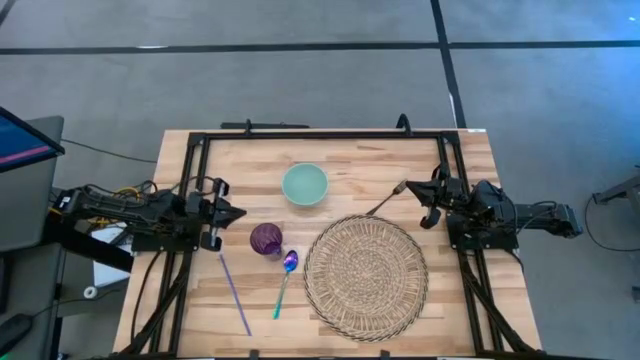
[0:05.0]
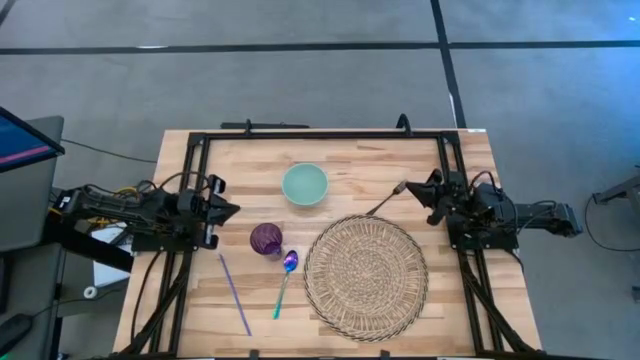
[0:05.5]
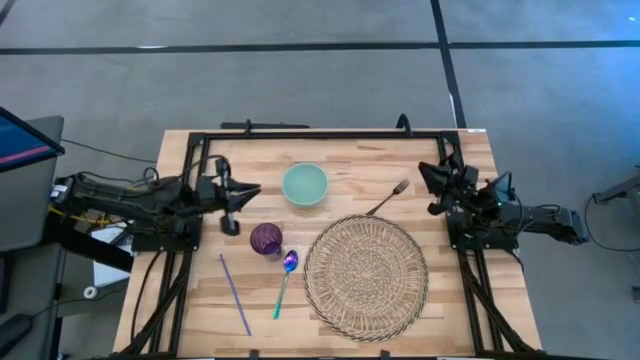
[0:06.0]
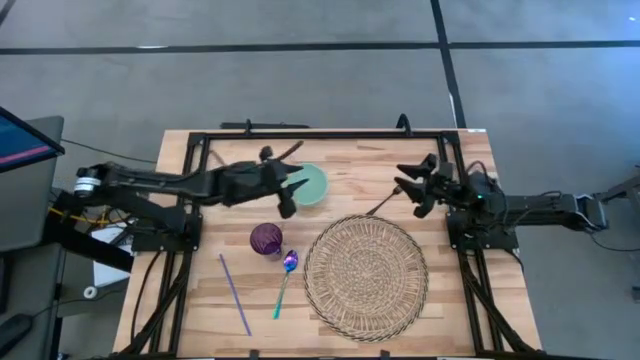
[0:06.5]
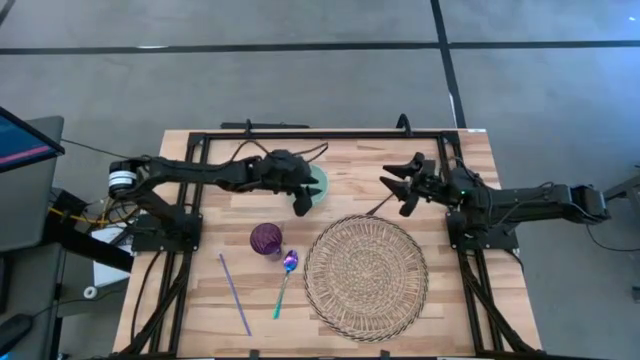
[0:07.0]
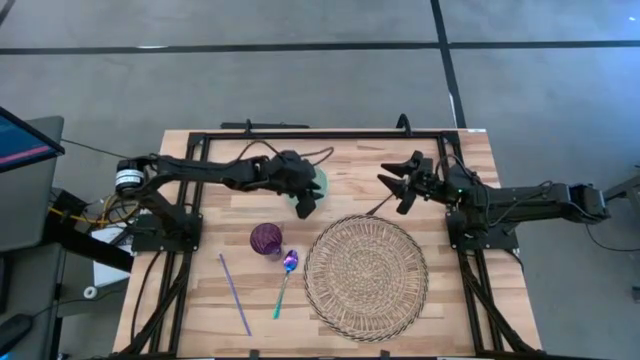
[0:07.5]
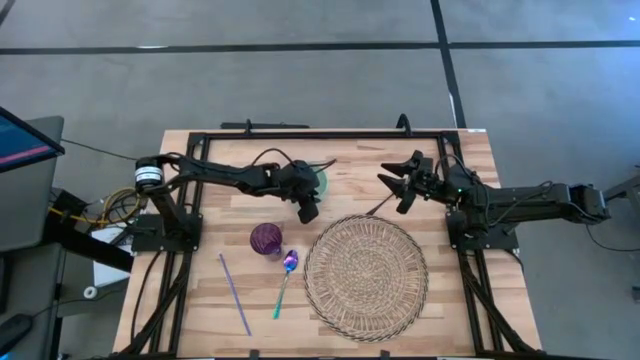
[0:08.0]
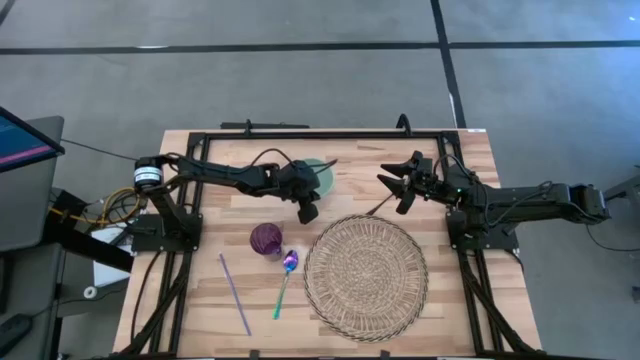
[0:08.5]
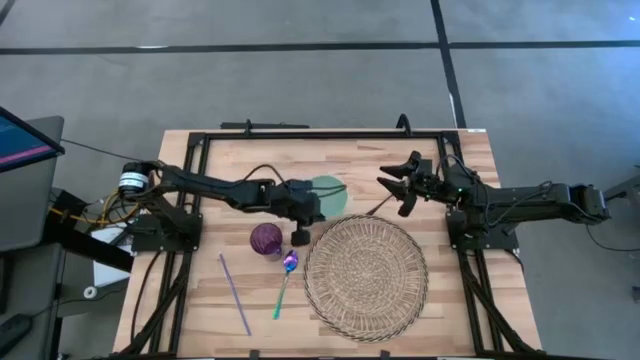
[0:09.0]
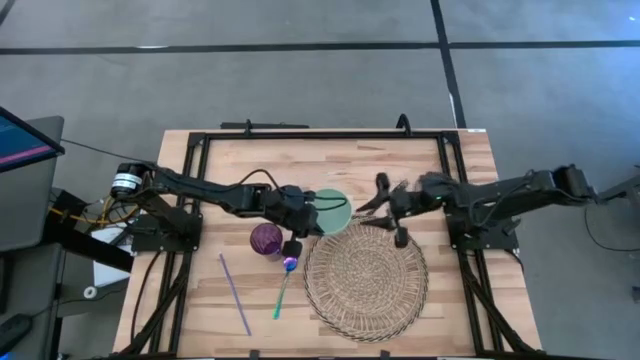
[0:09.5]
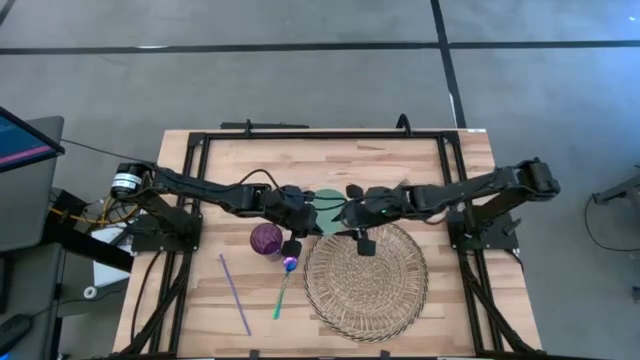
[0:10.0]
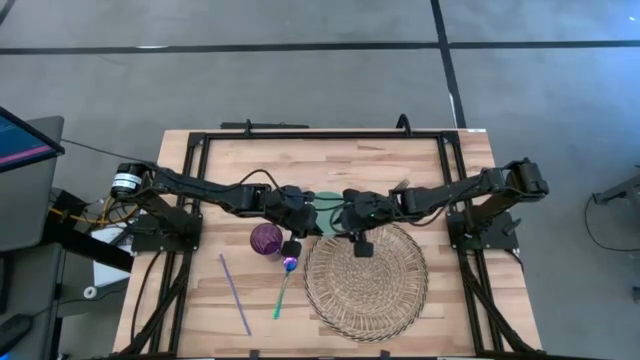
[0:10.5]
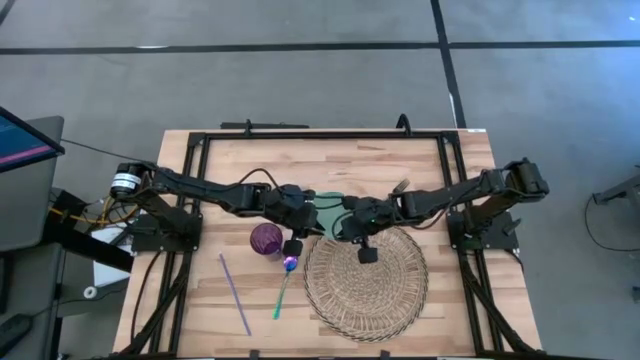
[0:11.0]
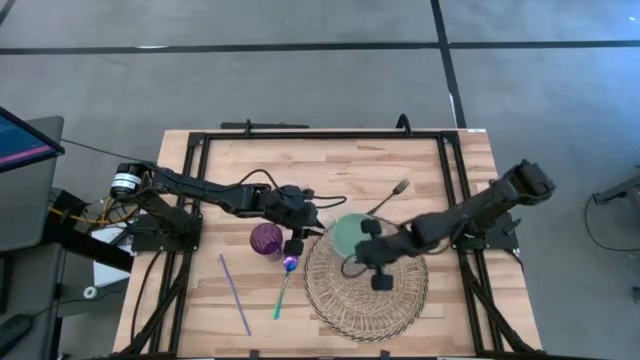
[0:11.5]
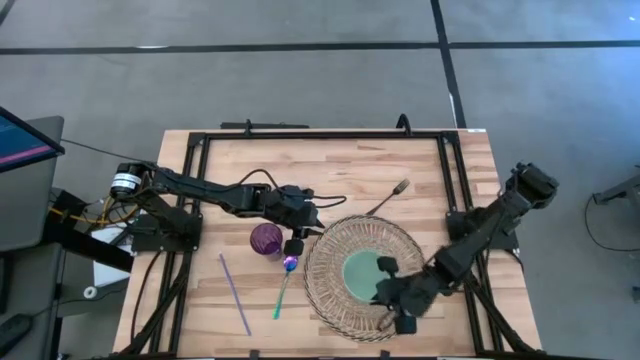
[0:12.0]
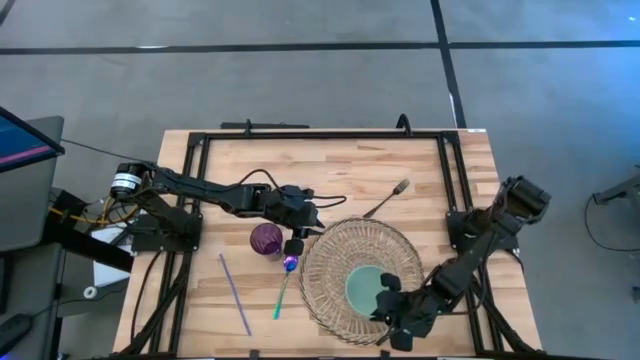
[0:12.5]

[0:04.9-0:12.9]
Task: Pick & Place Utensil
Put the green bowl on the bottom of the brown mat

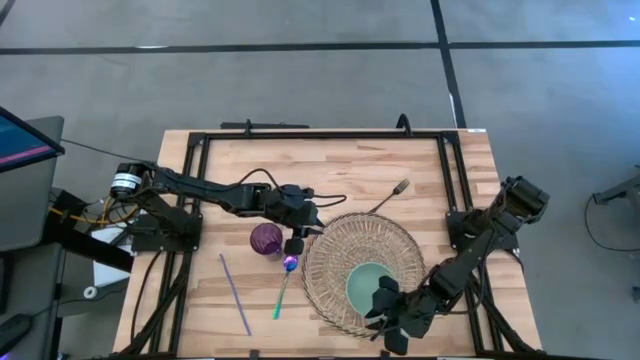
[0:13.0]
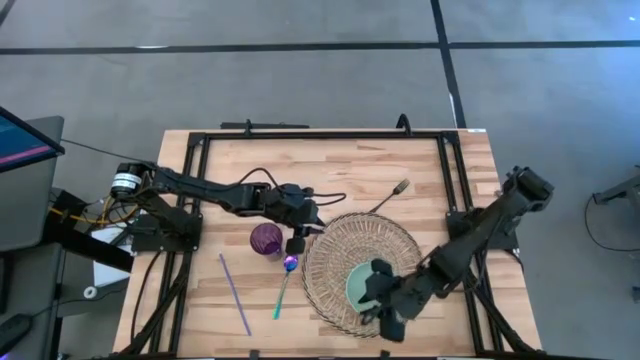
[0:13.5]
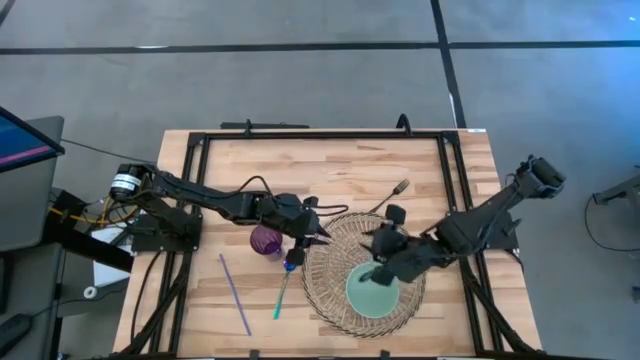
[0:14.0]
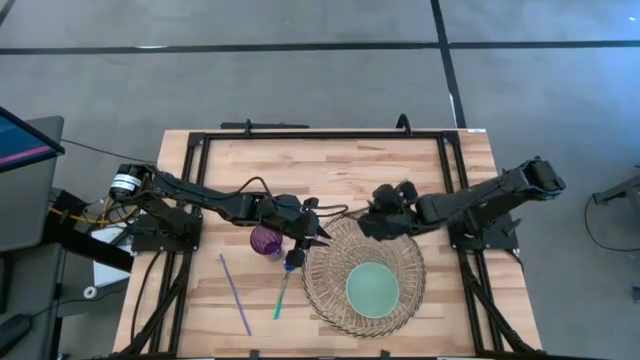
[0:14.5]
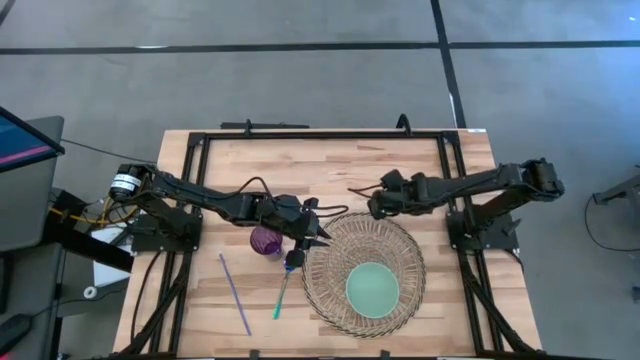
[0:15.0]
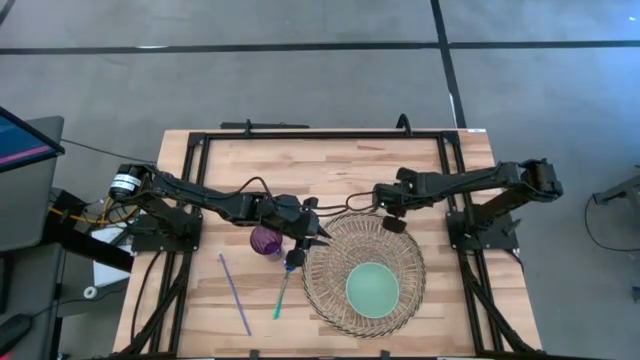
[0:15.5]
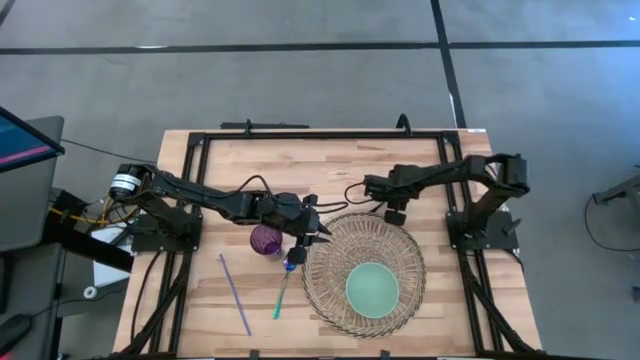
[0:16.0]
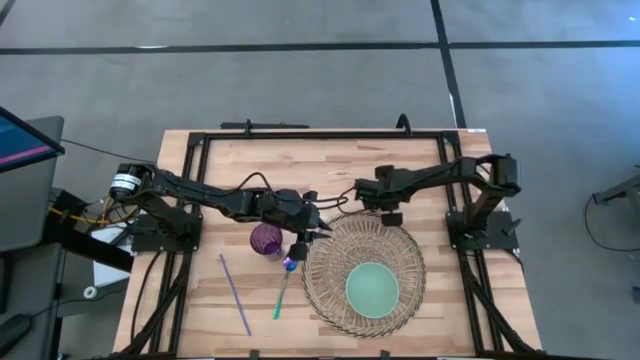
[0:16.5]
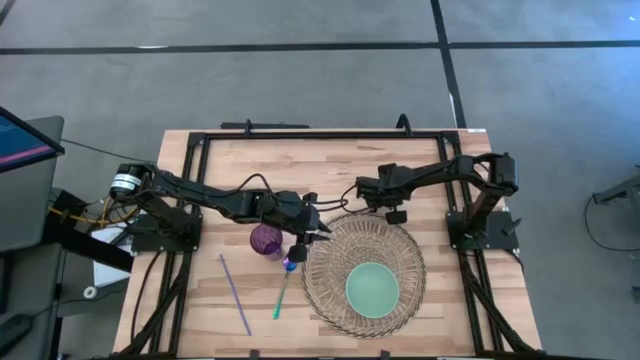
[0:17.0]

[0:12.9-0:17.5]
Put the black fork into the green bowl on the brown mat

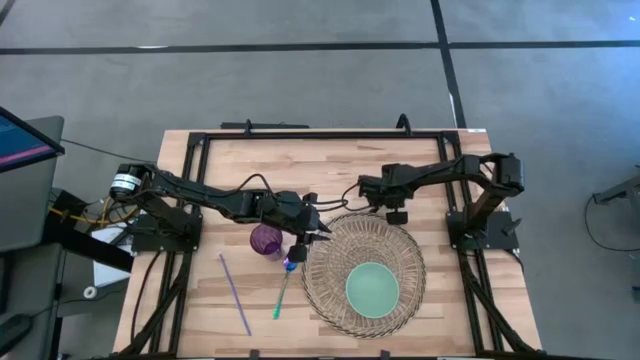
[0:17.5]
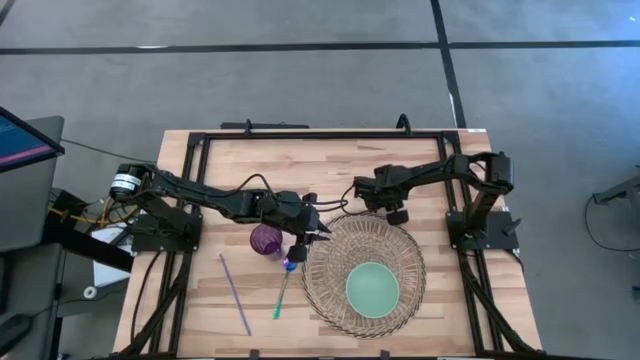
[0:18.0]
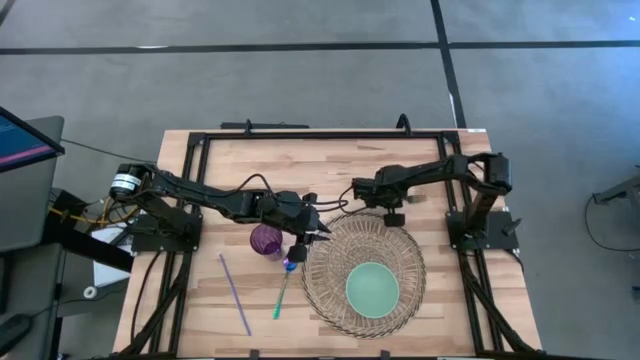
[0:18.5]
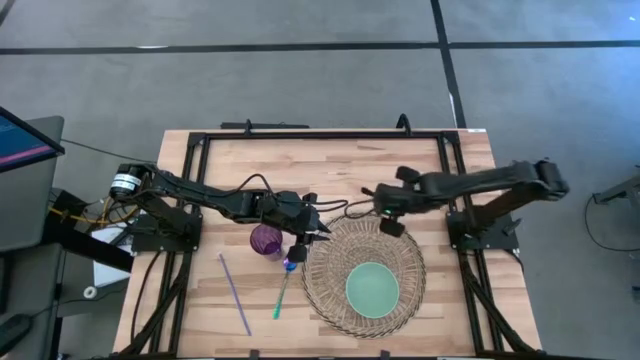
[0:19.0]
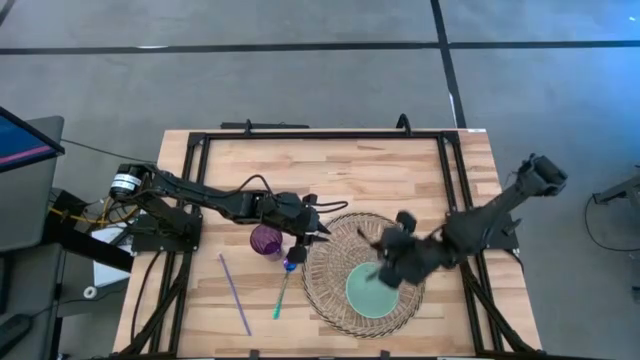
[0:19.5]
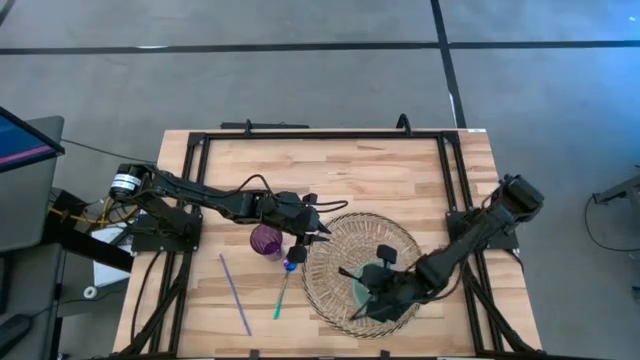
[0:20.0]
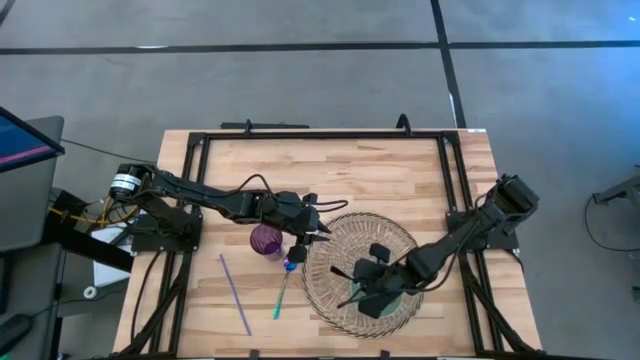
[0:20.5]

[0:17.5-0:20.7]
Put the black fork into the green bowl on the brown mat

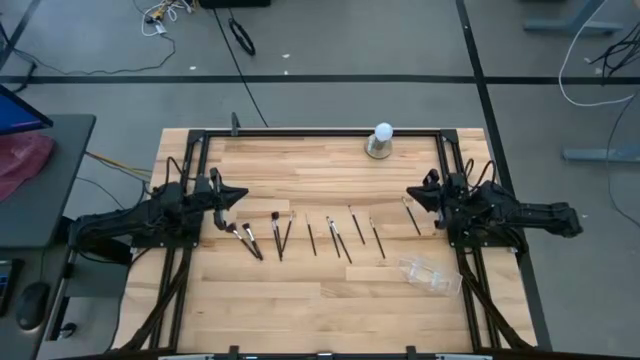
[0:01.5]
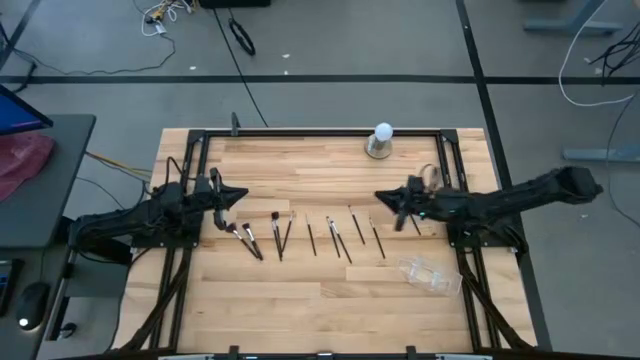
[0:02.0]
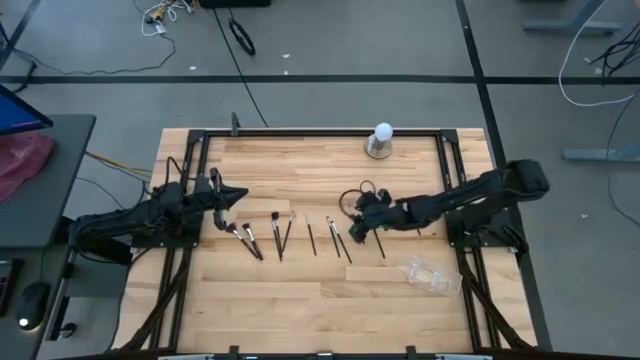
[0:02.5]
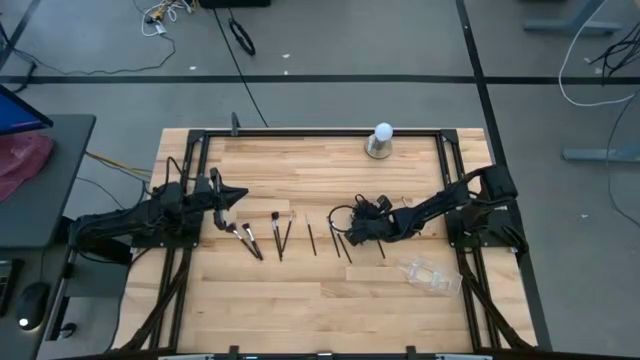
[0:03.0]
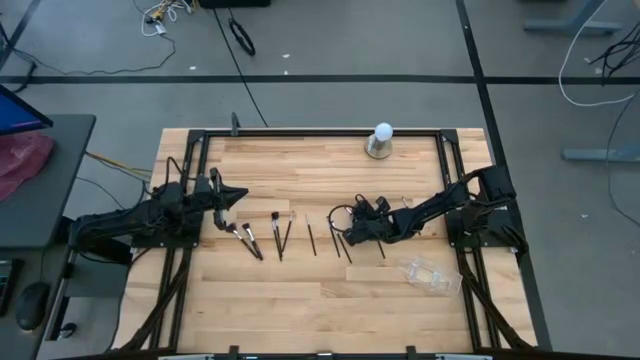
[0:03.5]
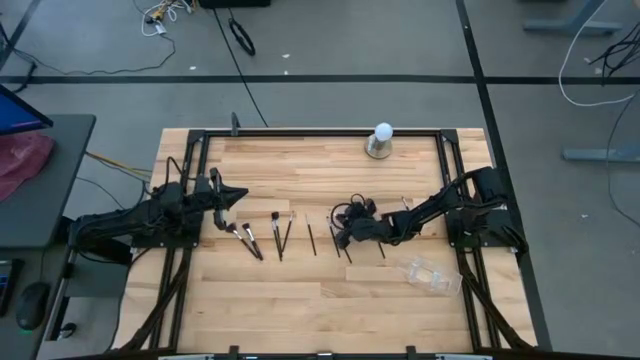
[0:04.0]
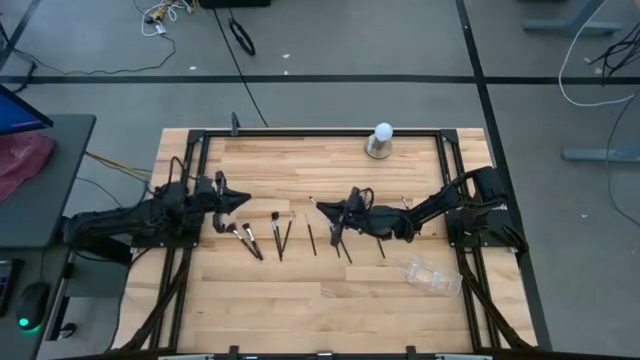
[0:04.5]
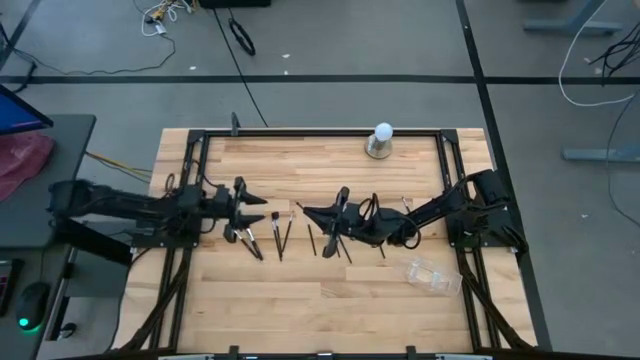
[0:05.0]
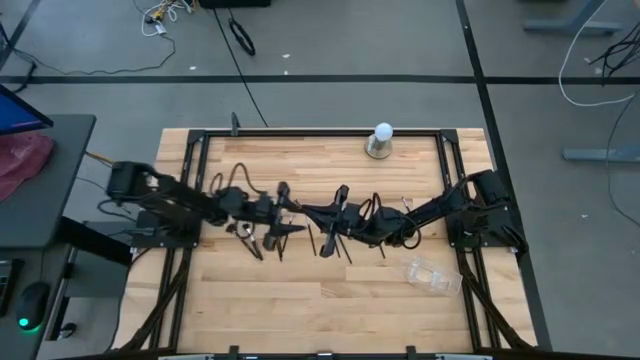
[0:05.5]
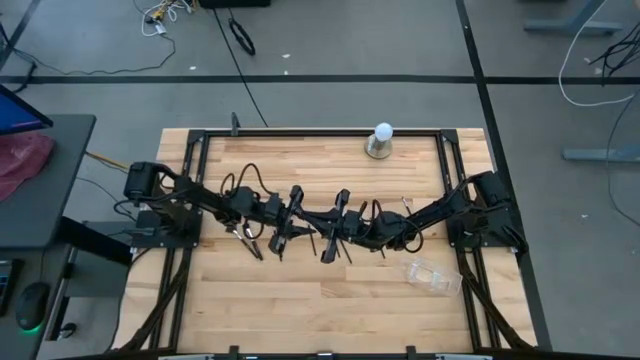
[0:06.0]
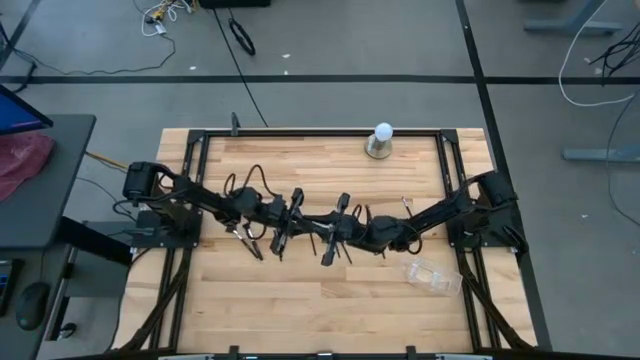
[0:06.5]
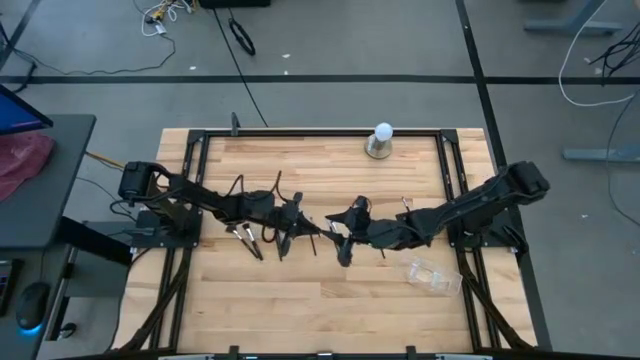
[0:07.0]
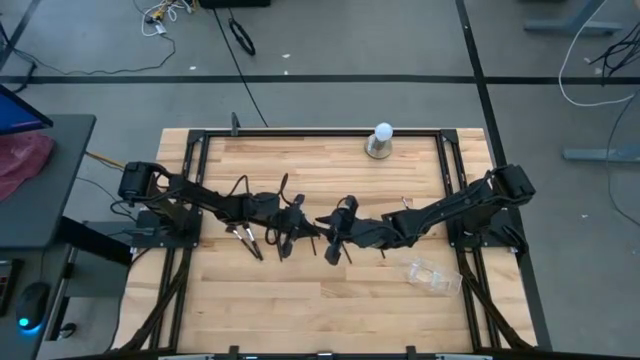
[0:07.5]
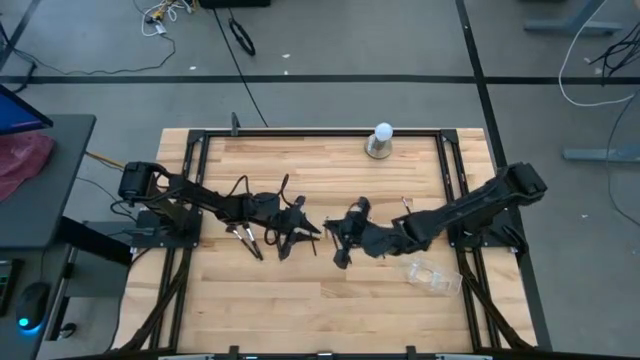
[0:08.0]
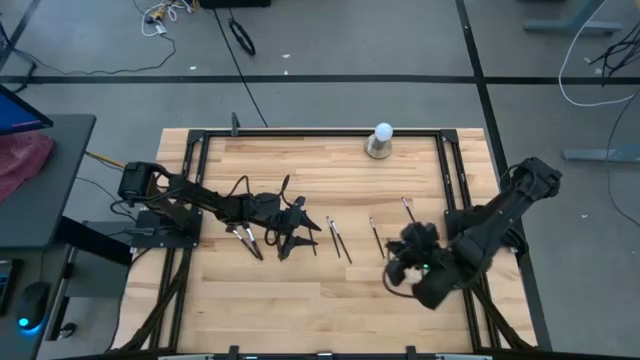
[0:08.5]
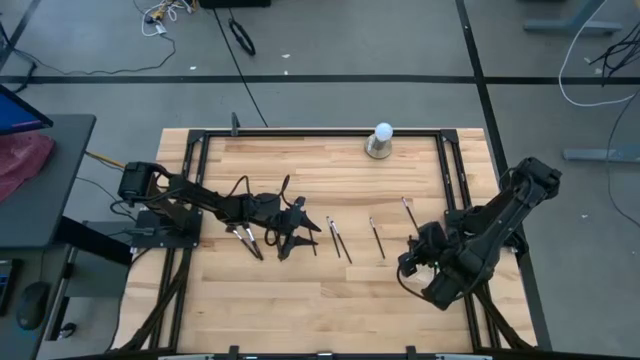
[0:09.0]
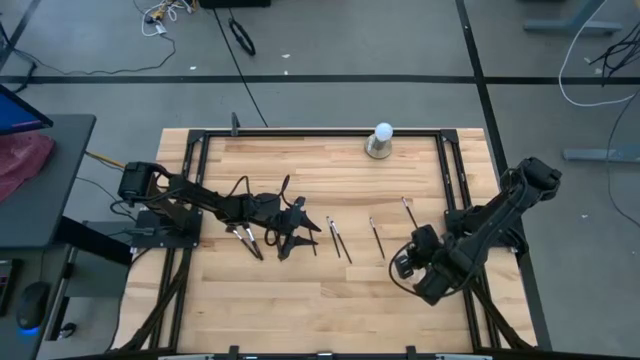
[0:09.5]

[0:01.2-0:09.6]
Task: Put items in baskets/containers
Put the black eyeshadow brush into the transparent organizer
